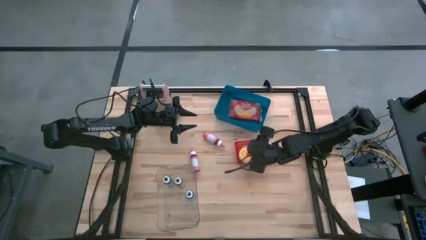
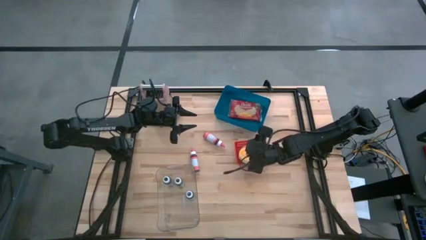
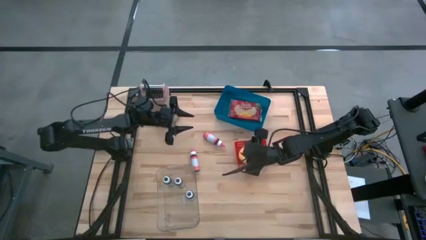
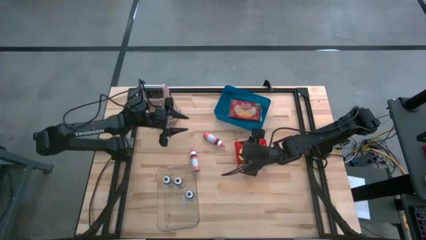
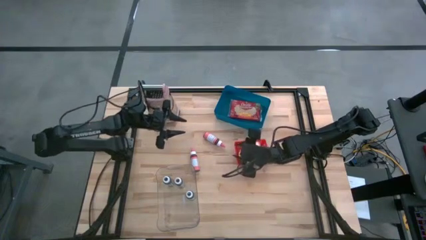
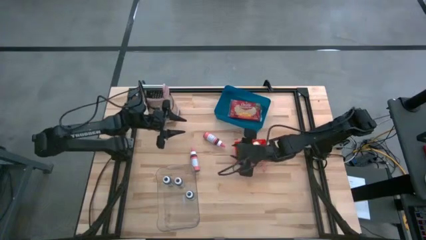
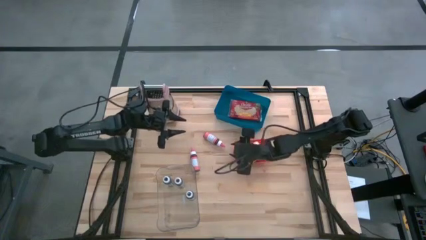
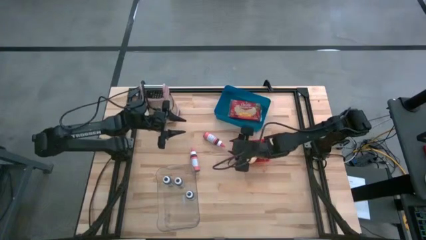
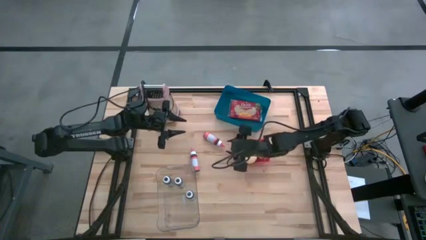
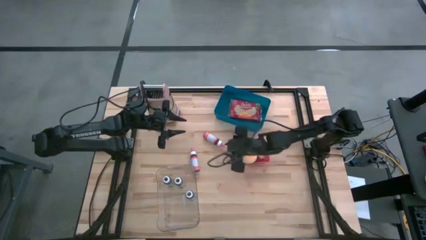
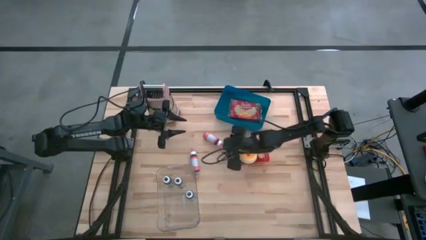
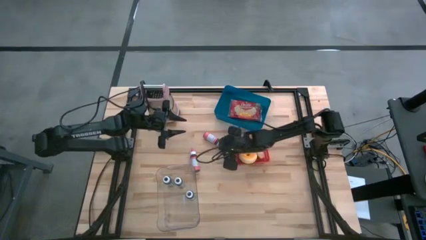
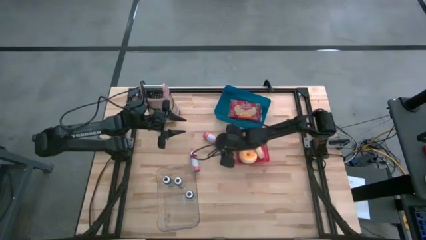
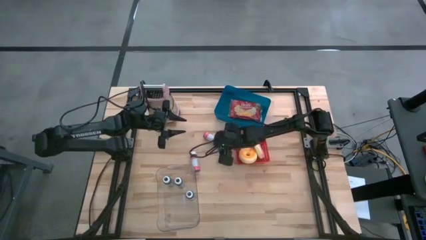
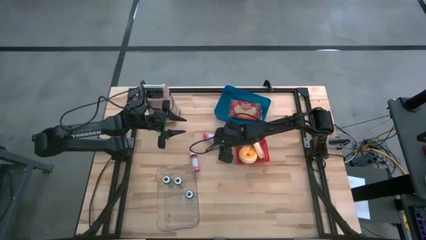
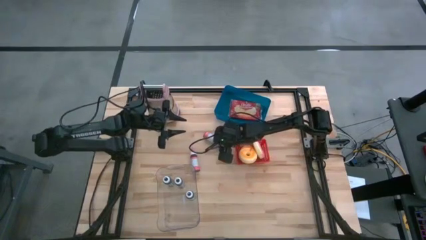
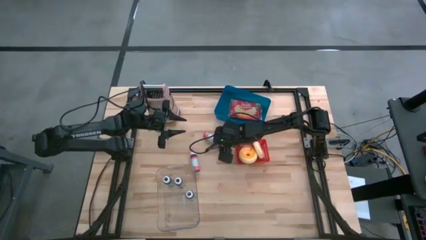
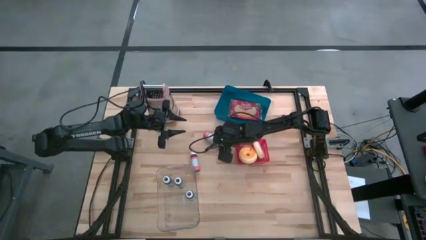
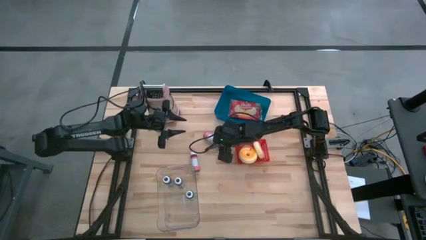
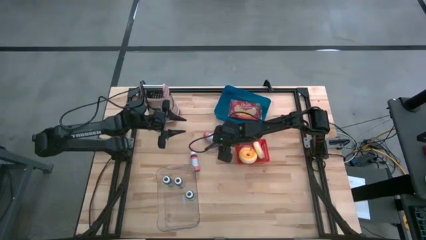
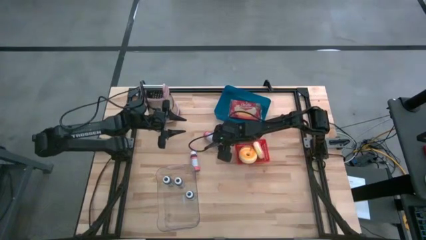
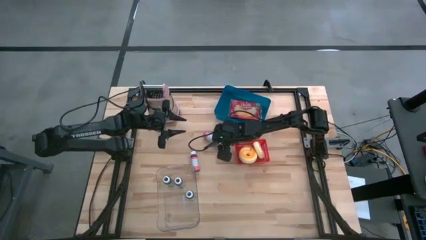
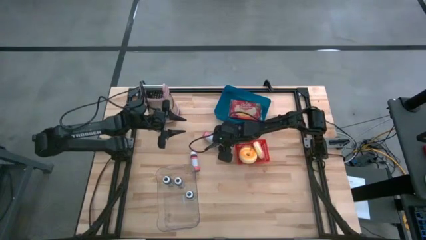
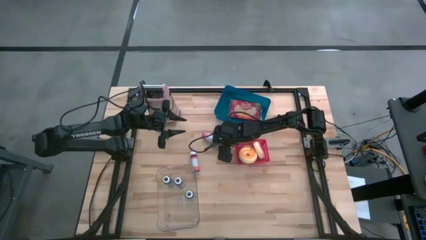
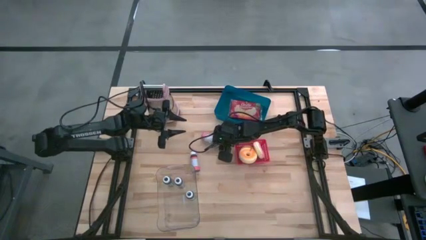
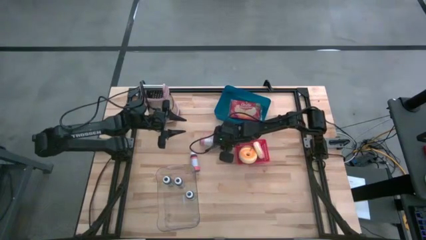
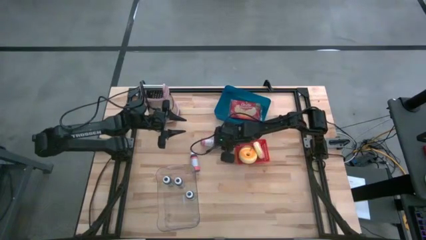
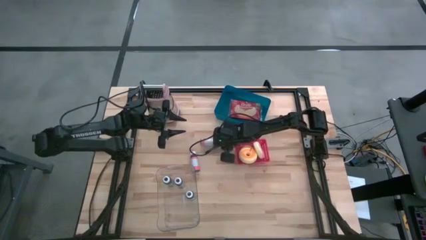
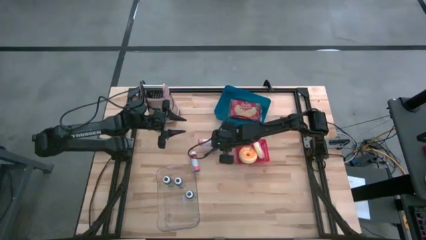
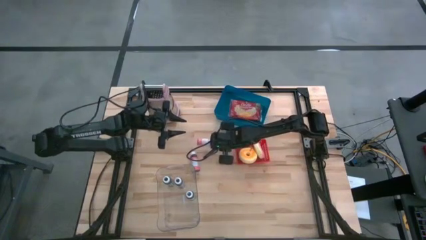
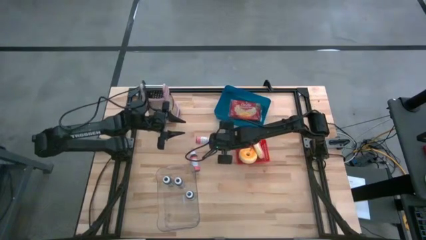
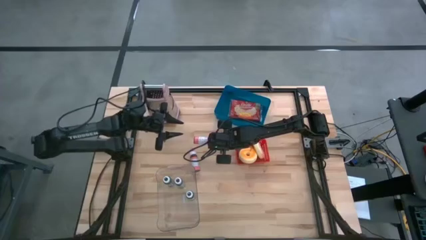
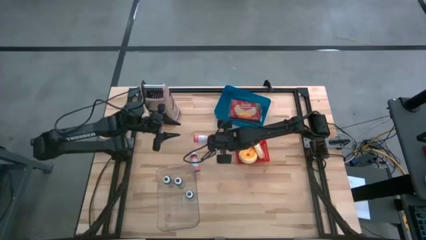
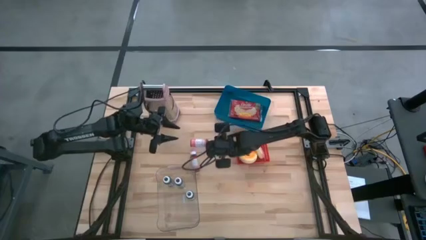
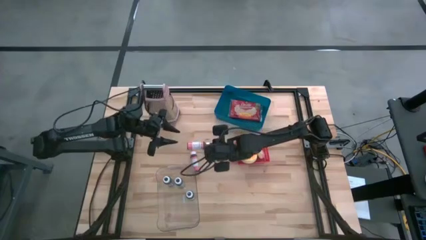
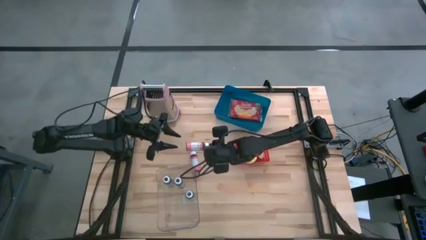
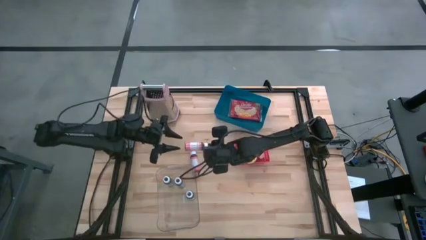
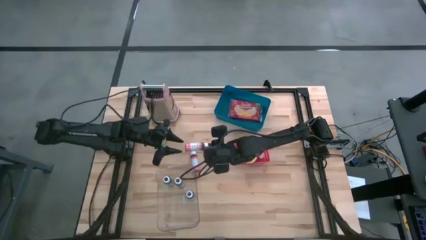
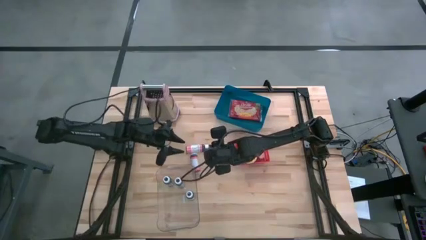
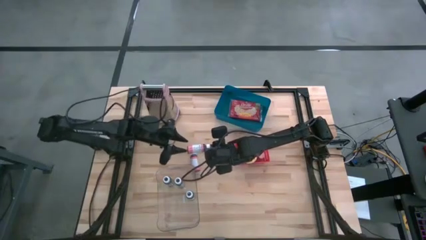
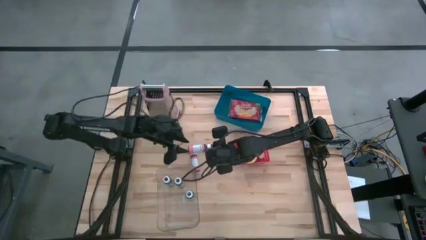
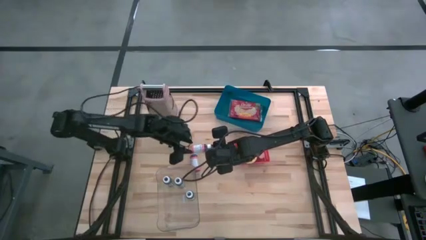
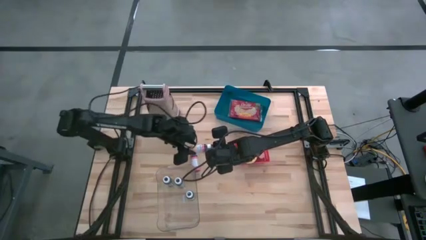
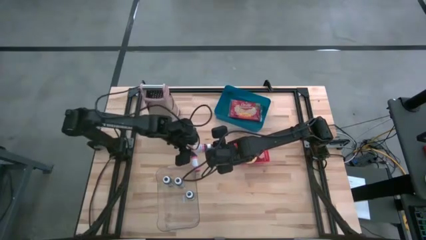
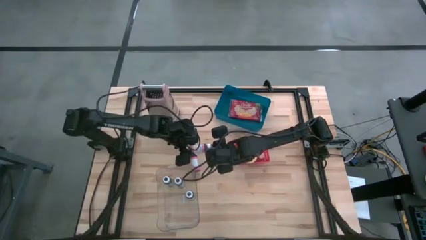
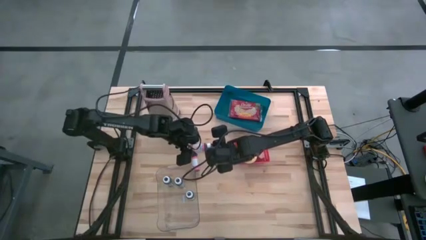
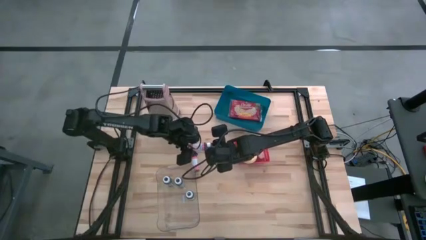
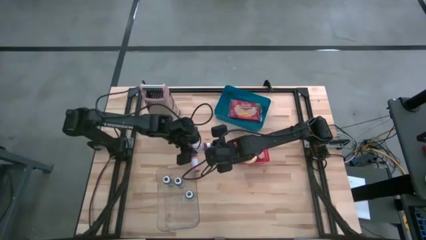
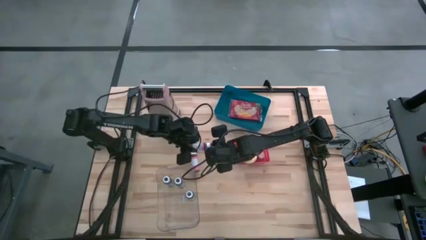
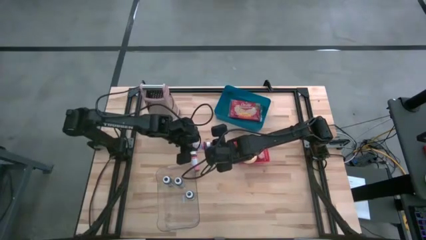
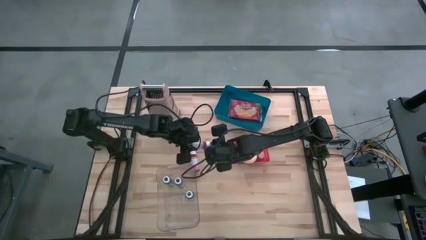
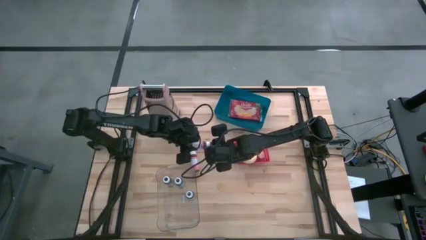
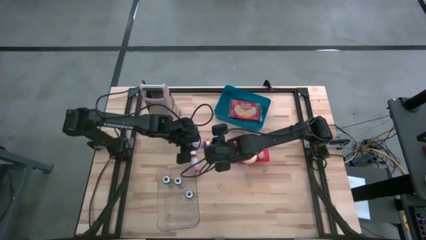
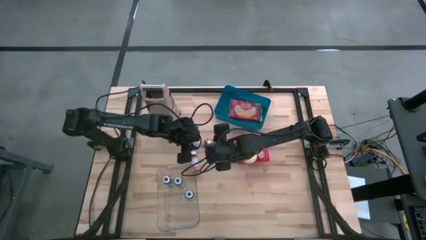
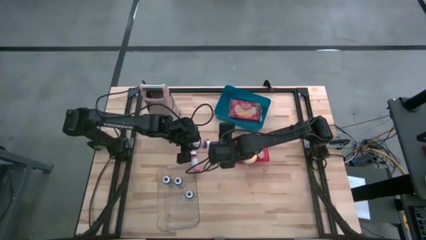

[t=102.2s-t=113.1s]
Task: Pick & Place Food Item
Put the top pink food coloring bottle into the transparent bin

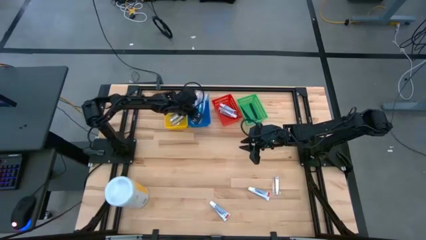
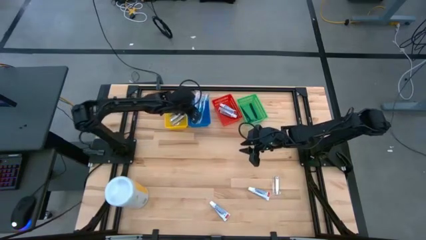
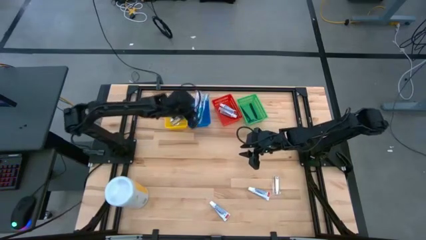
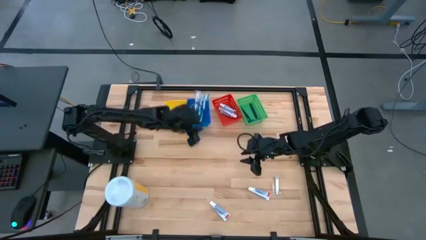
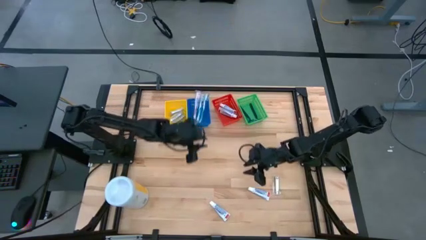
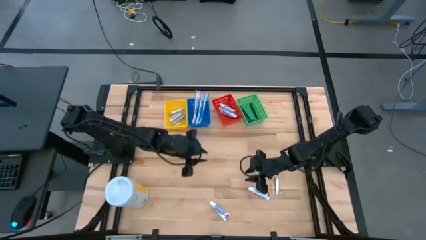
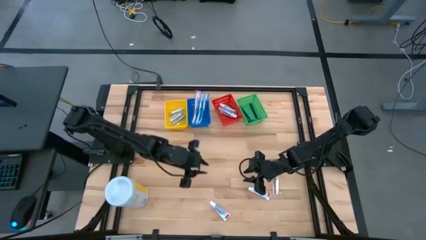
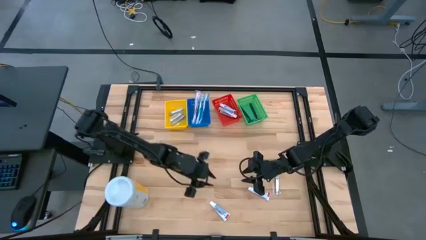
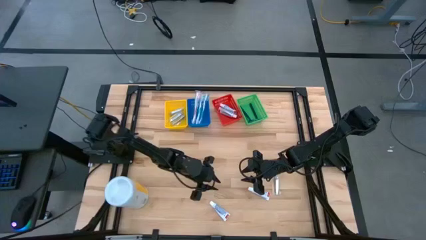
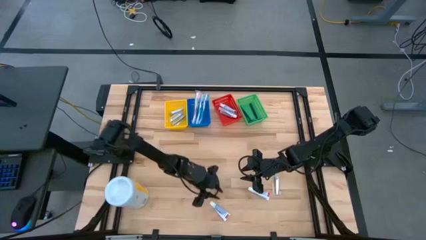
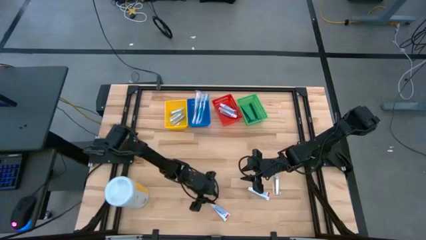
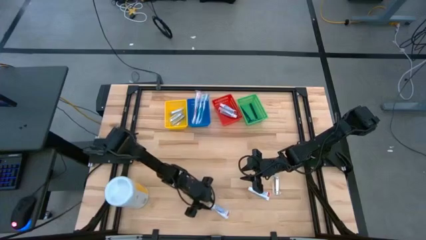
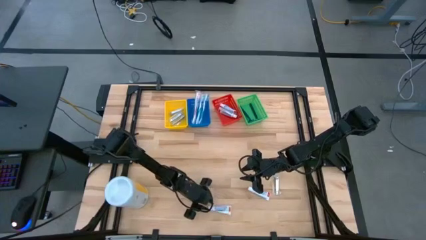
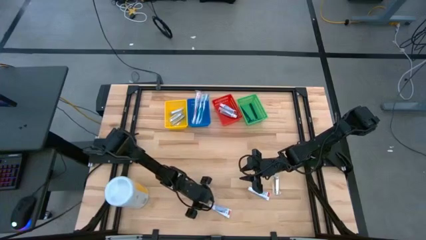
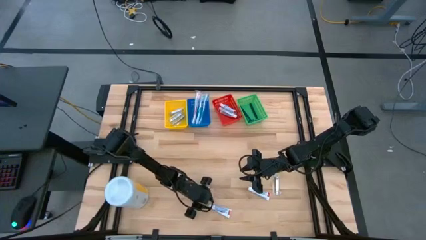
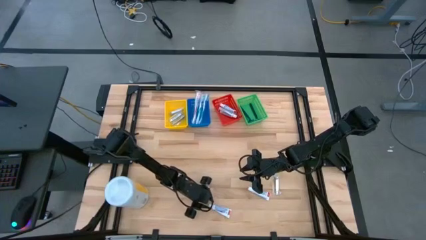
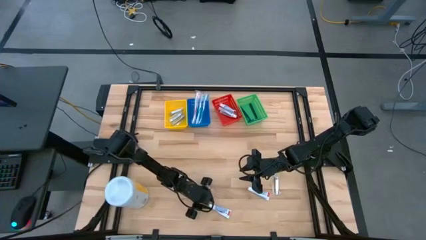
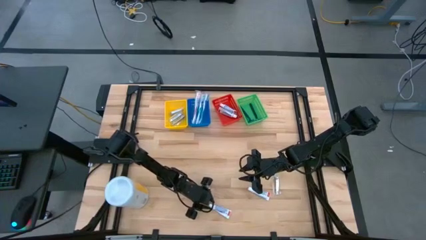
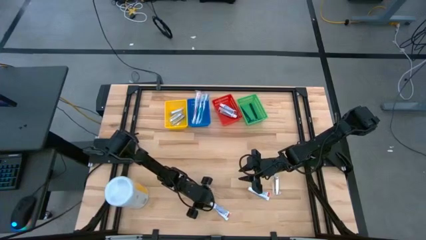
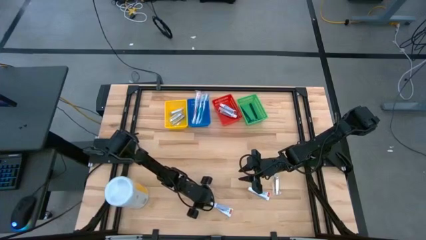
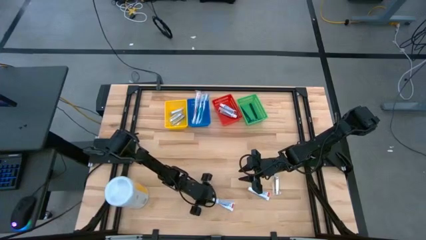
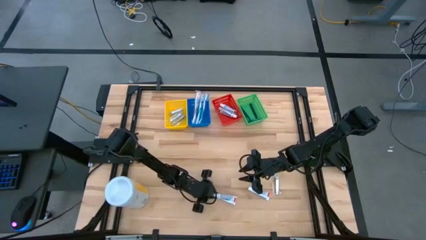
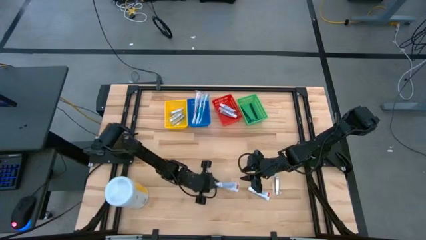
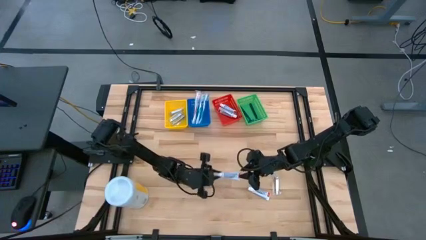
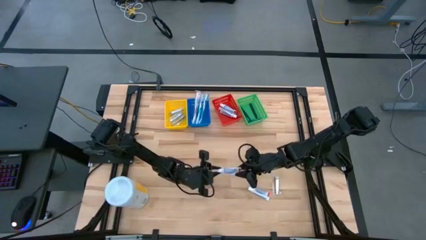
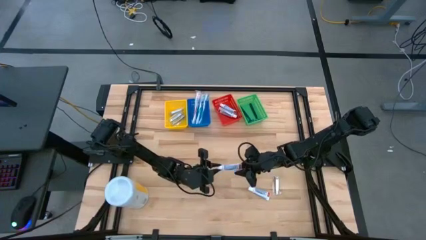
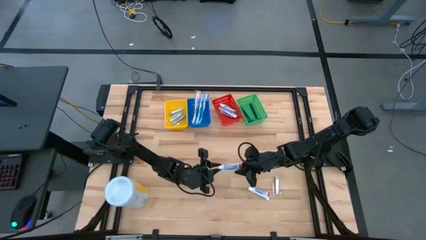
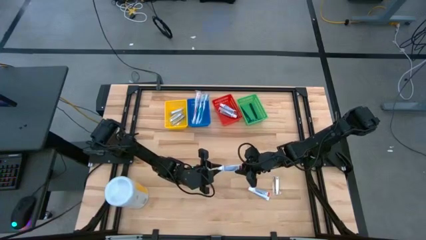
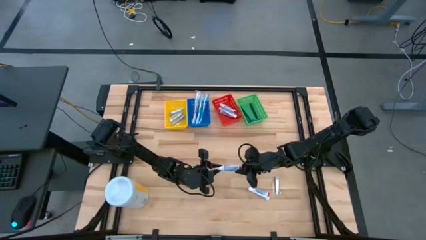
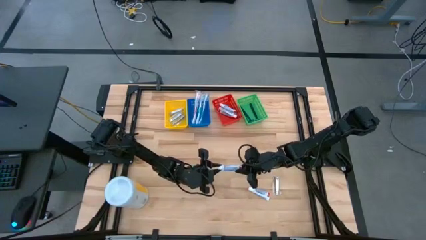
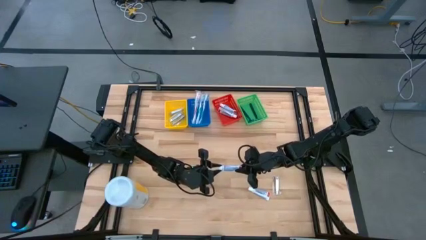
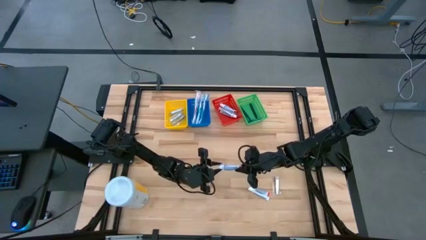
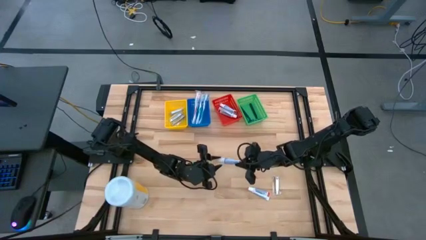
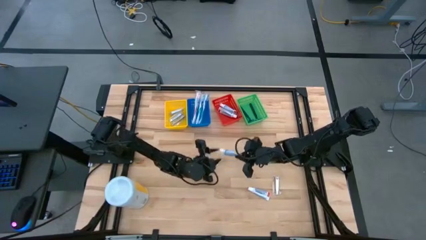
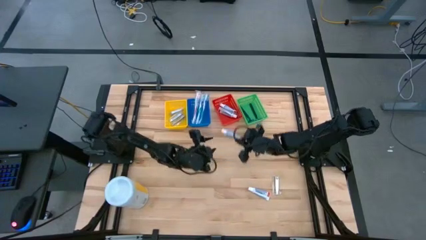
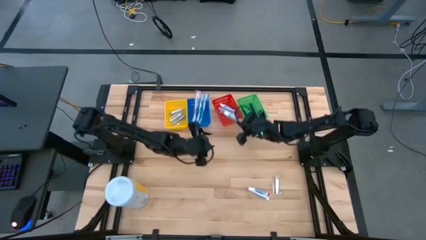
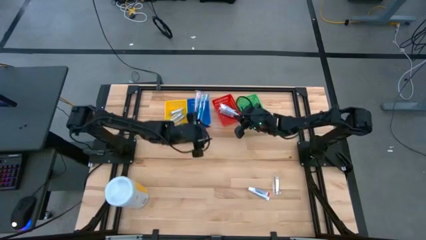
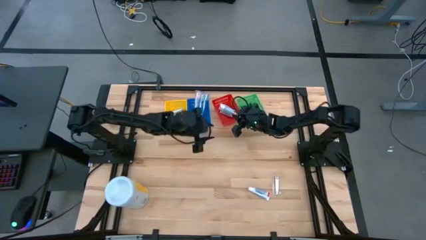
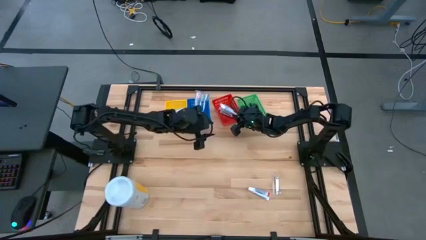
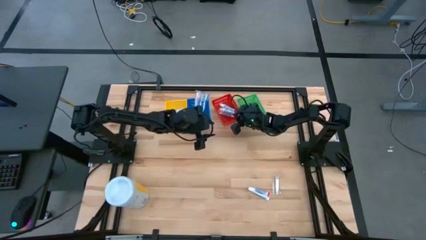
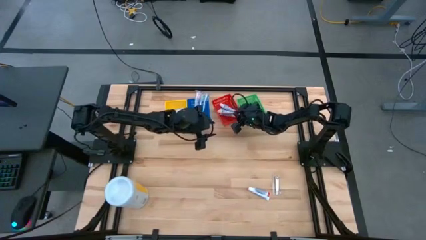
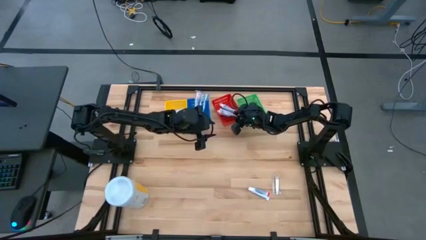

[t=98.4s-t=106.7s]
Task: Pick & Place Travel size toiletries
Put the left toothpaste into the red bin
